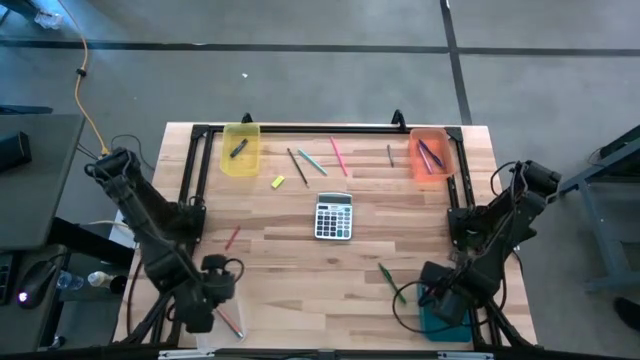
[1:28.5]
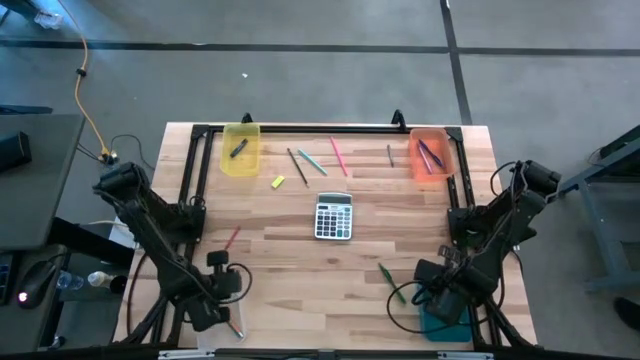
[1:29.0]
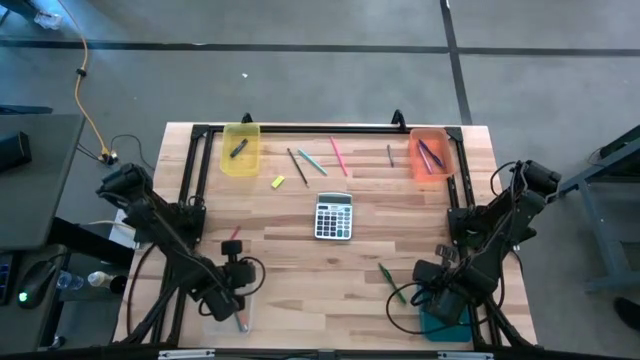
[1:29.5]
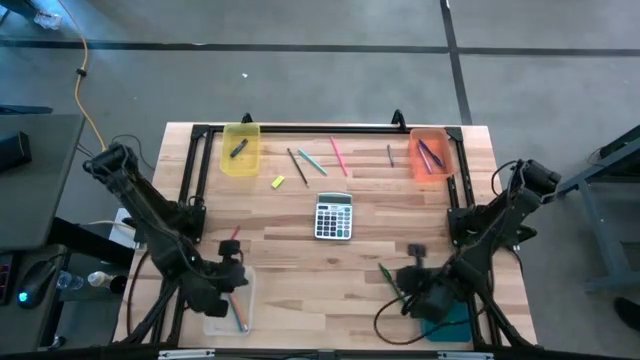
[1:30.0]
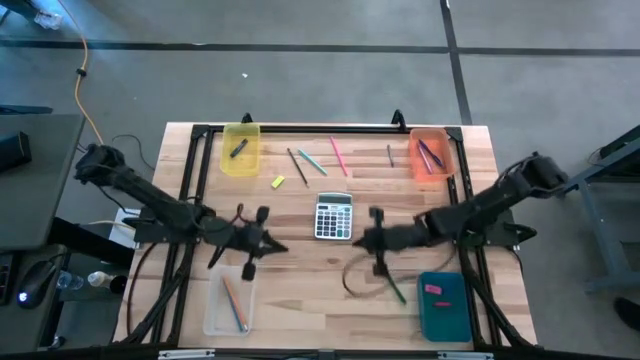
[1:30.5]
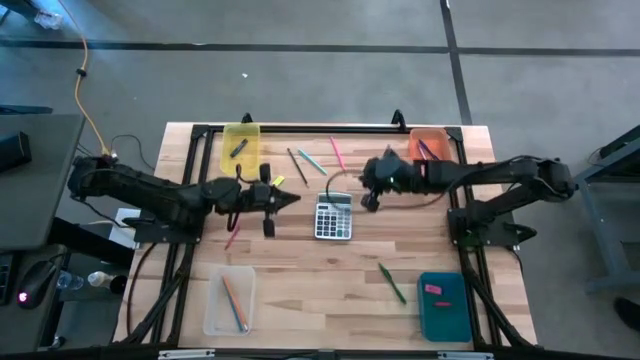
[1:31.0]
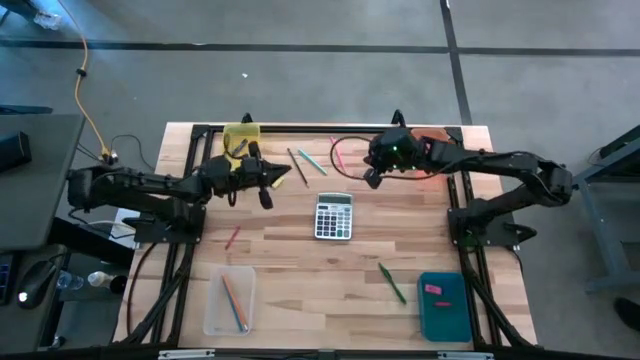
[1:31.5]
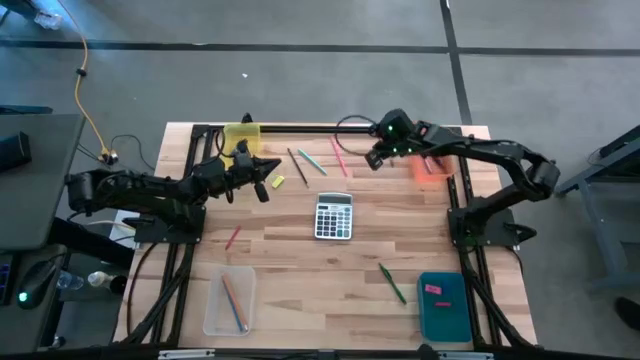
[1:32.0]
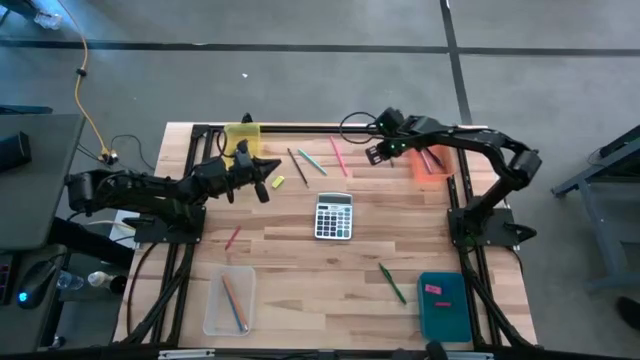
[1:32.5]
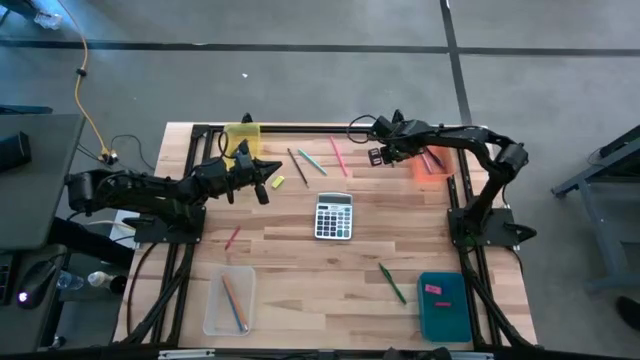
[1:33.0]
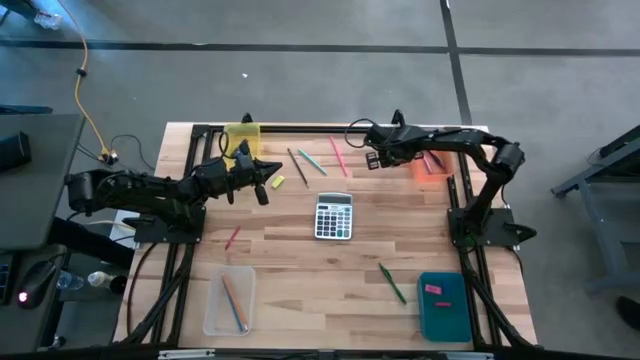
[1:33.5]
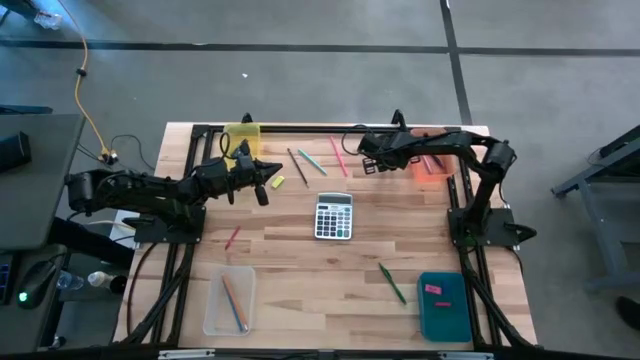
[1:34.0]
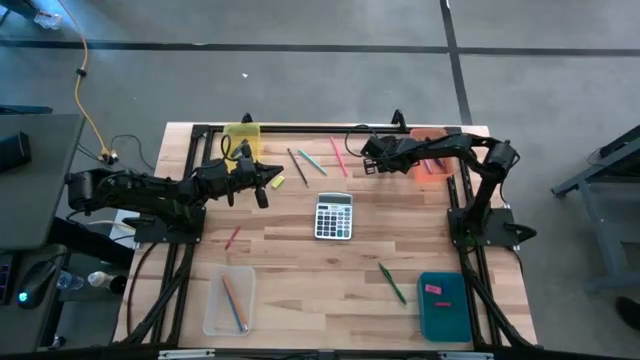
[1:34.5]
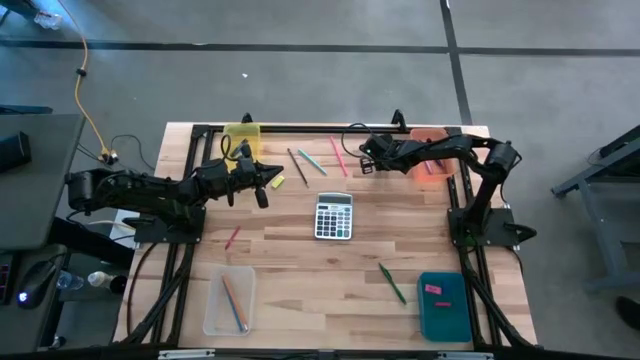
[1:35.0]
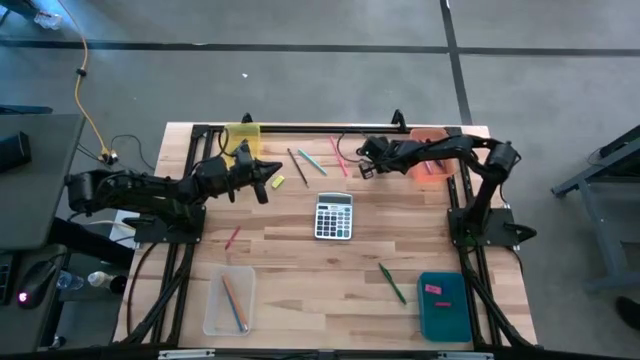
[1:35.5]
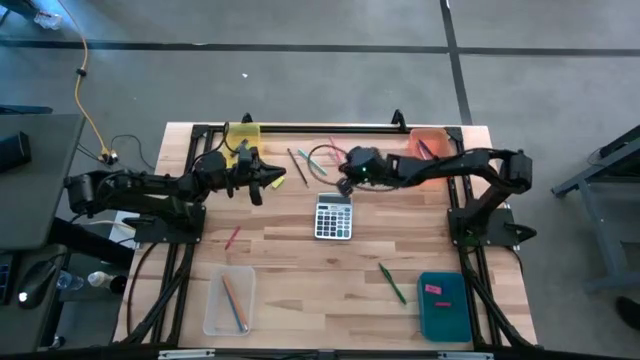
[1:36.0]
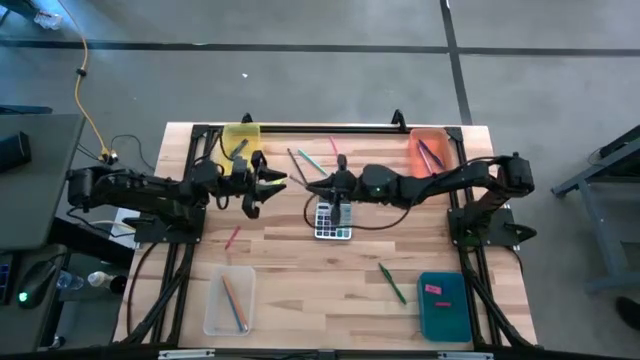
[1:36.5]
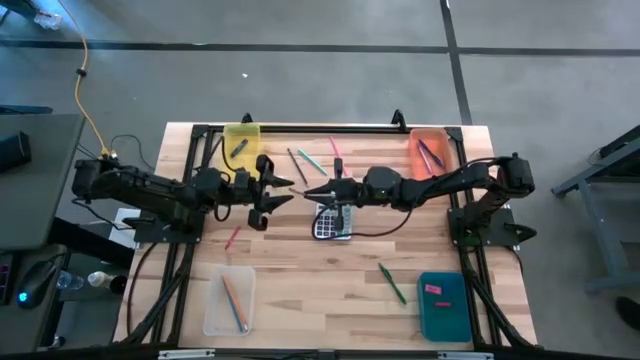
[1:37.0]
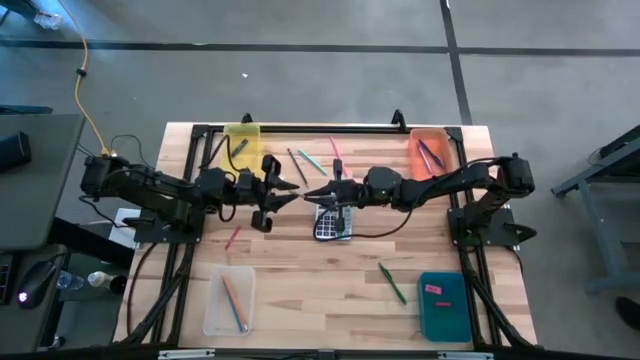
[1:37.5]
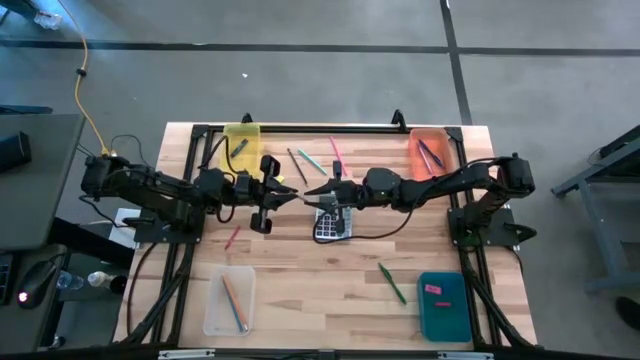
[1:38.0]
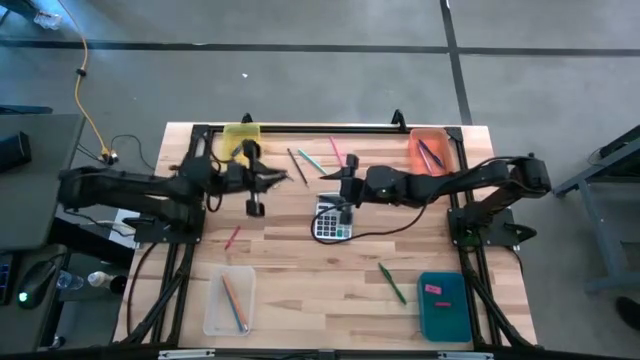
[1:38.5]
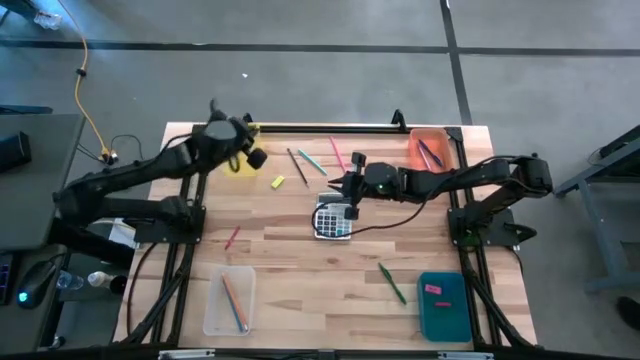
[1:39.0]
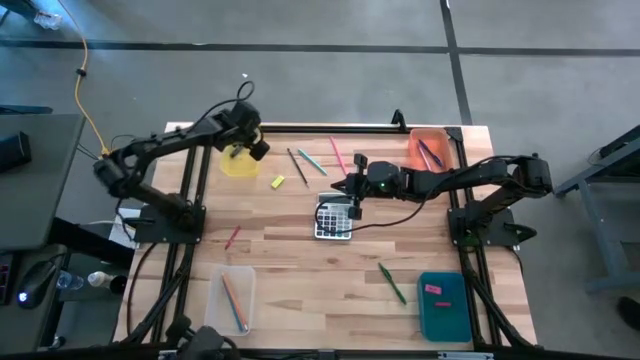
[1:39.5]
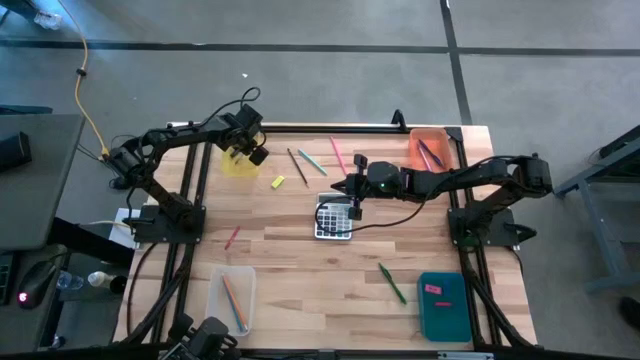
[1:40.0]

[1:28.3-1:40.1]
Task: Sort crayons/erasers/pens/pencils in bins
Put the gray crayon into the yellow bin

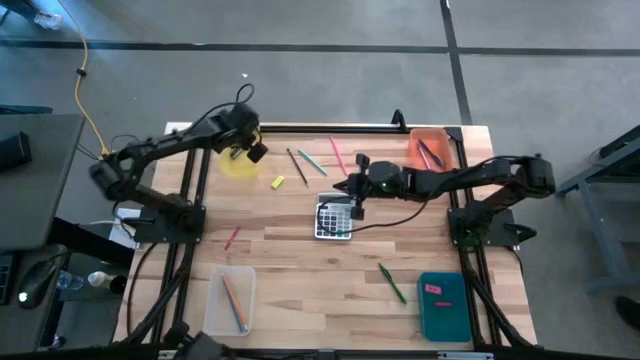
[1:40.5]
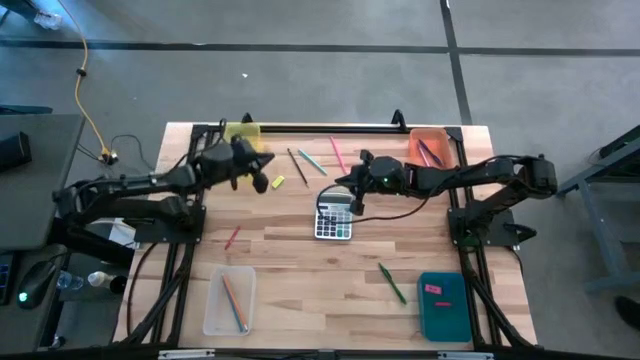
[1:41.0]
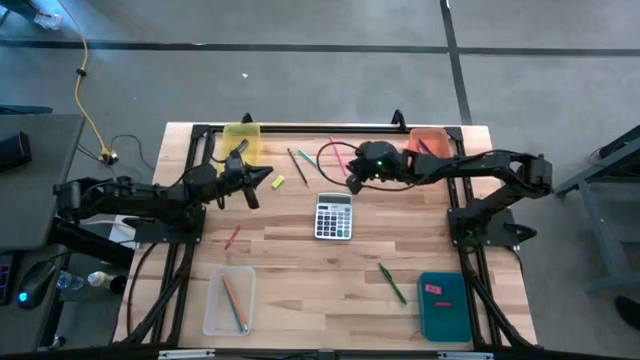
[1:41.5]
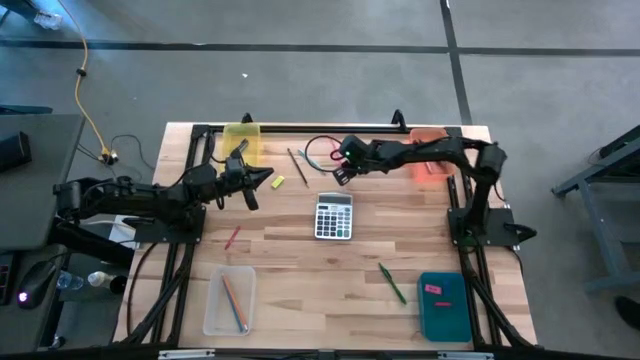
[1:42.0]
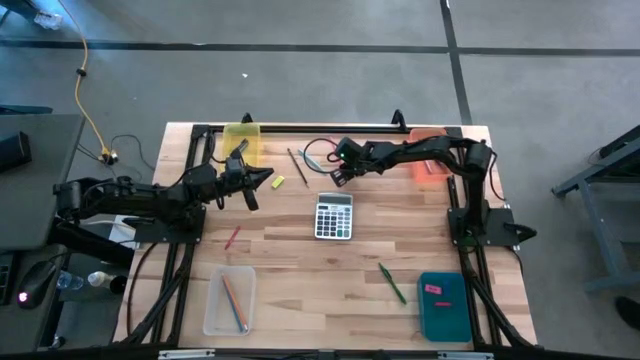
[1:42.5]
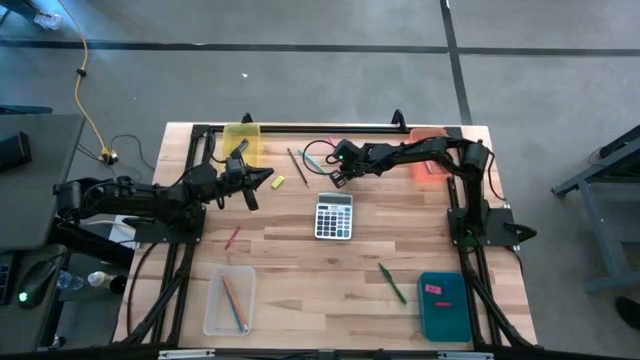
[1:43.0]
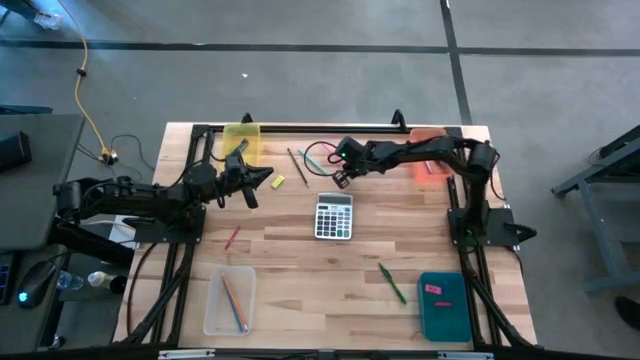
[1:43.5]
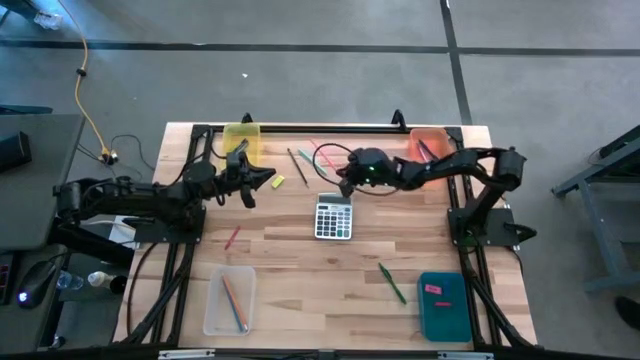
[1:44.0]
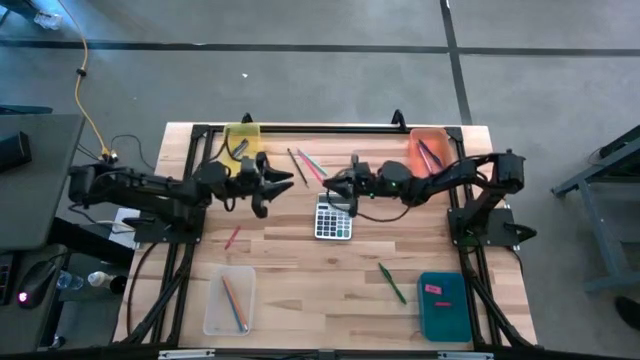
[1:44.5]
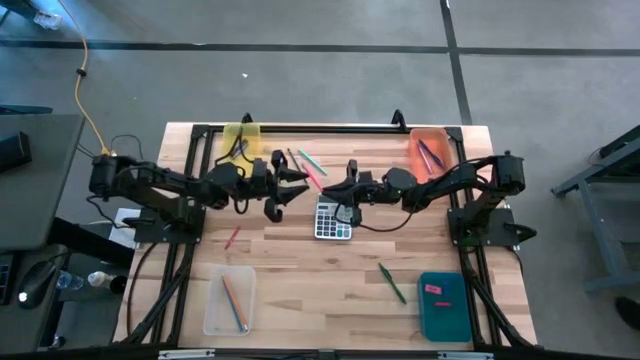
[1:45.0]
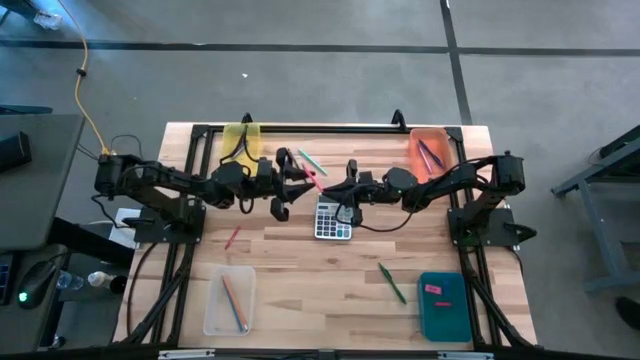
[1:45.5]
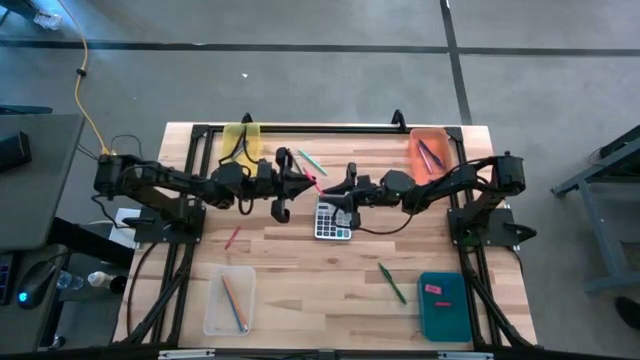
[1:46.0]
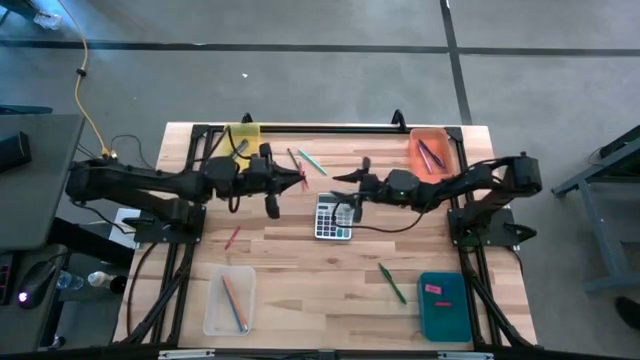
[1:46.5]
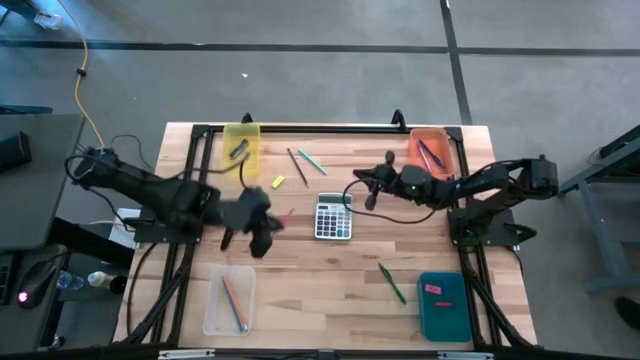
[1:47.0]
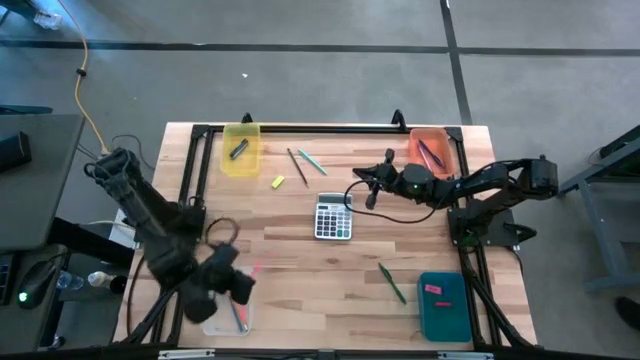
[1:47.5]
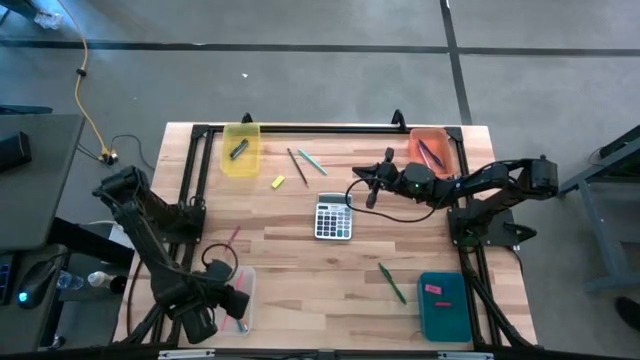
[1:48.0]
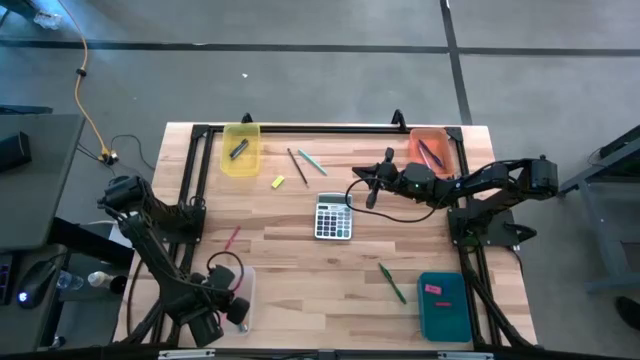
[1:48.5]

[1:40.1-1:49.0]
Put the pink colored pencil into the transparent bin

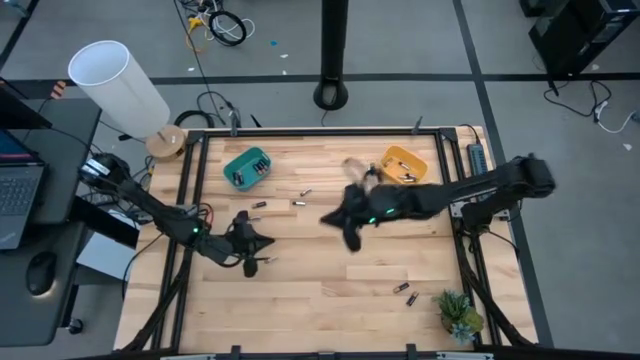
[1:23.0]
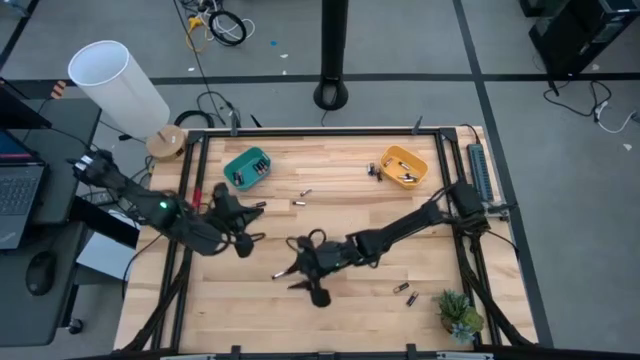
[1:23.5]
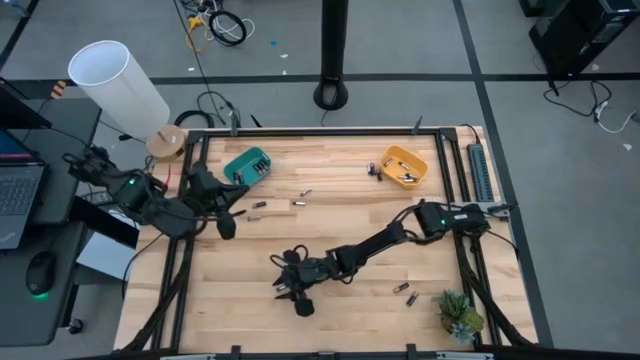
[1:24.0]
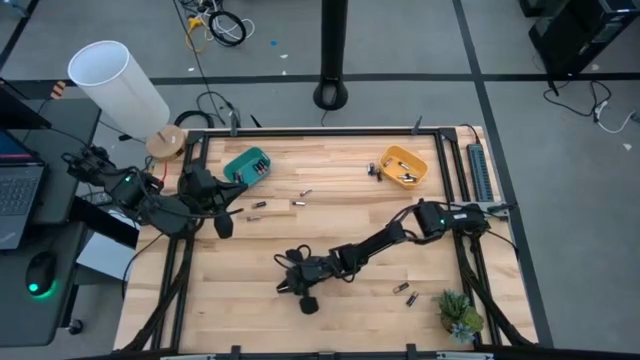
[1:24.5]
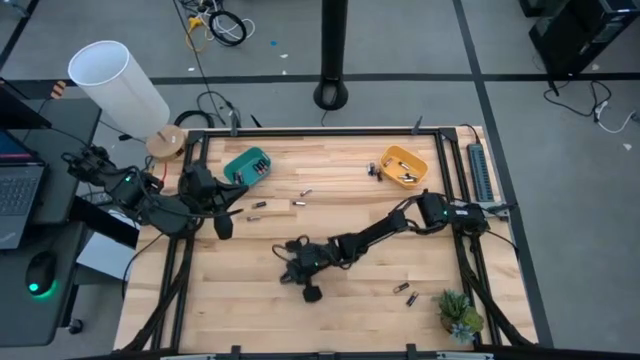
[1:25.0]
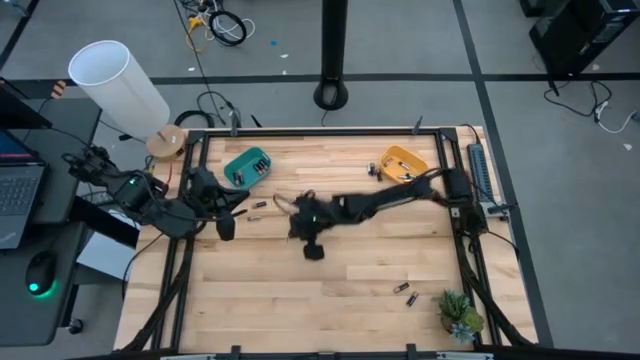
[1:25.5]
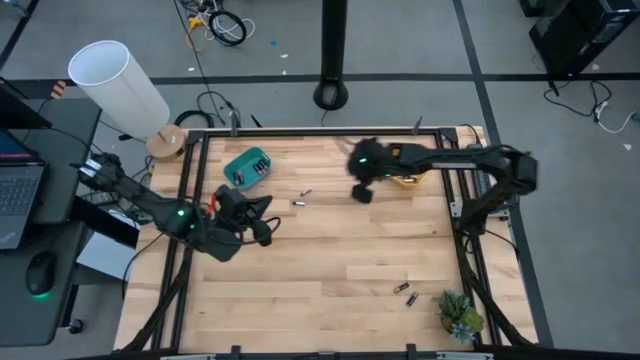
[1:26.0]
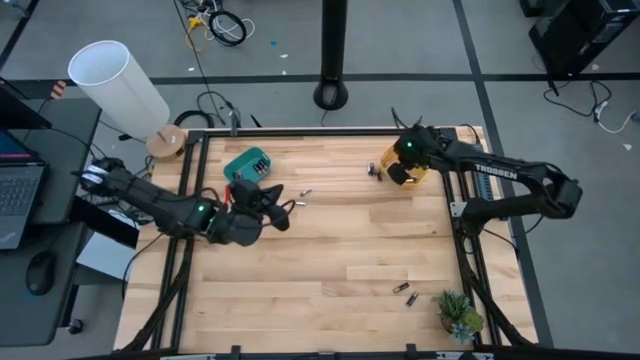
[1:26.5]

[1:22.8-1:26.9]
Task: Sort batteries
Put the silver battery into the yellow bin
